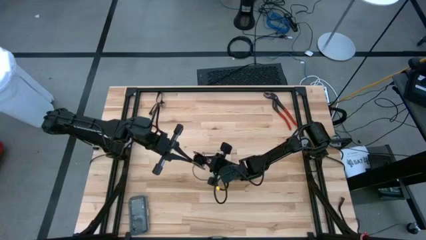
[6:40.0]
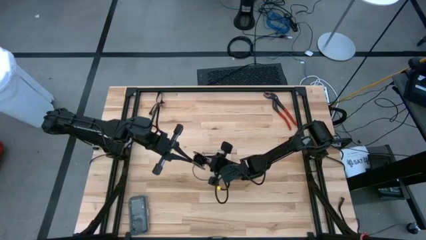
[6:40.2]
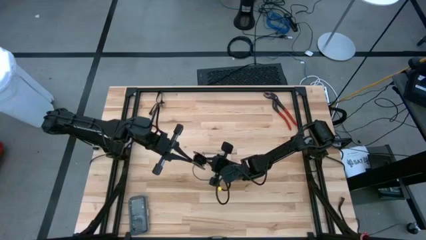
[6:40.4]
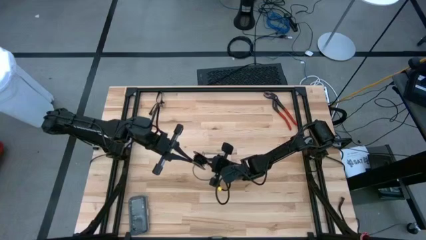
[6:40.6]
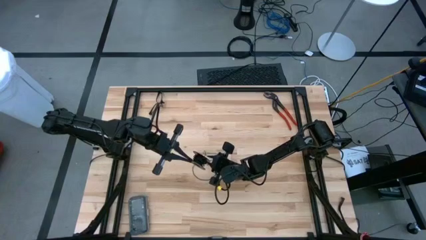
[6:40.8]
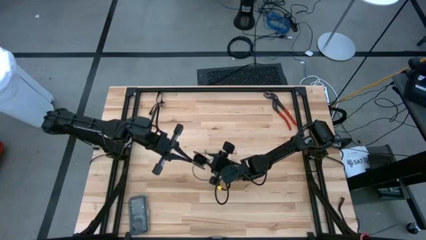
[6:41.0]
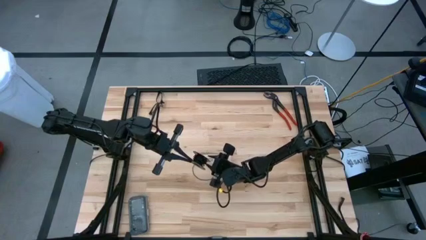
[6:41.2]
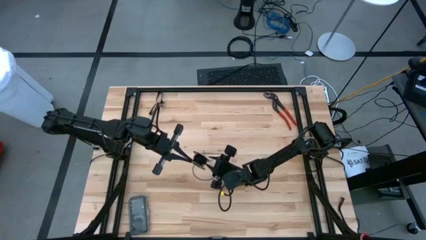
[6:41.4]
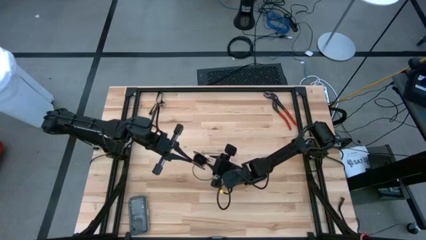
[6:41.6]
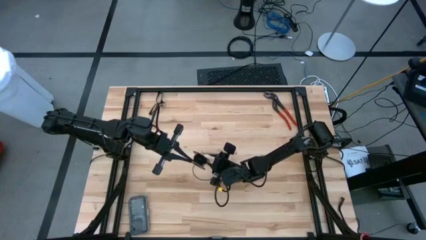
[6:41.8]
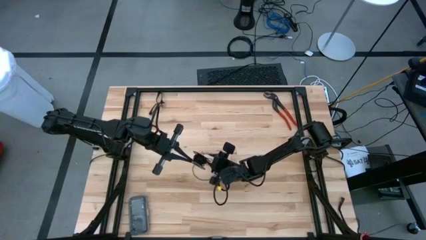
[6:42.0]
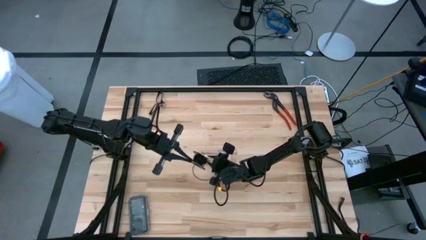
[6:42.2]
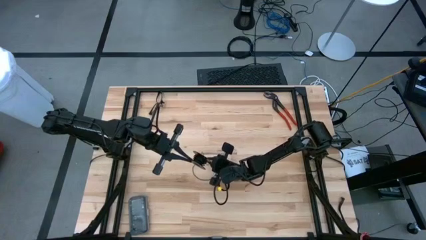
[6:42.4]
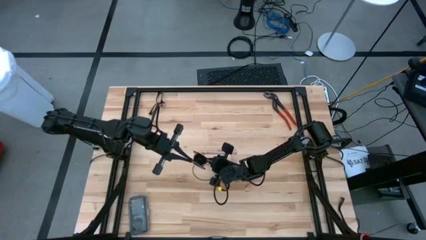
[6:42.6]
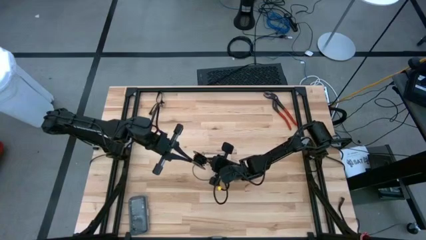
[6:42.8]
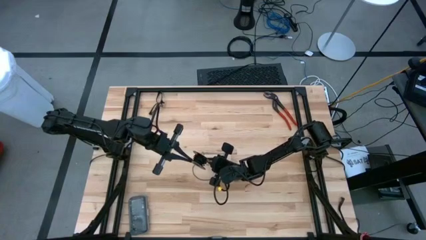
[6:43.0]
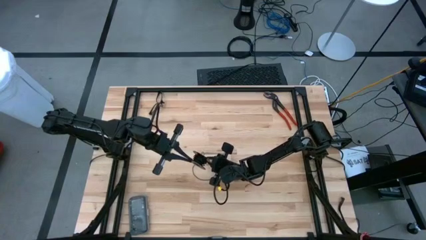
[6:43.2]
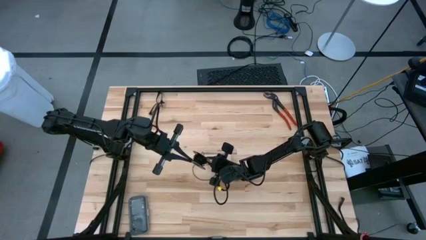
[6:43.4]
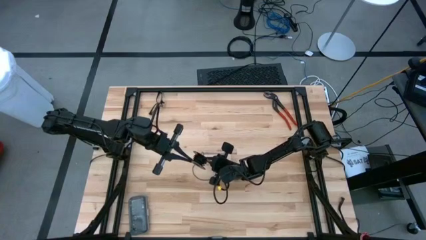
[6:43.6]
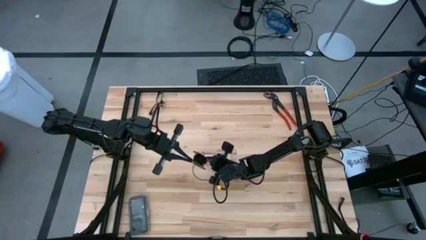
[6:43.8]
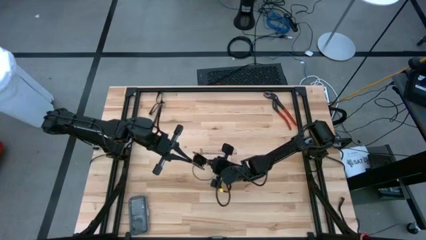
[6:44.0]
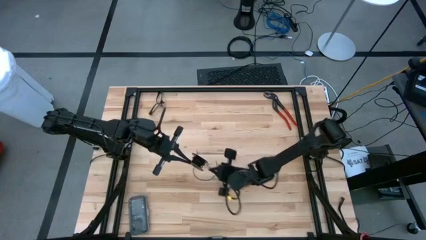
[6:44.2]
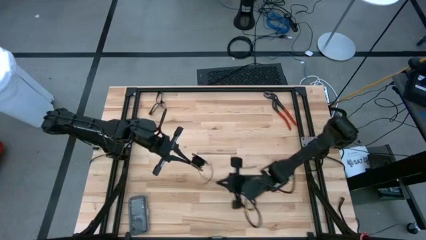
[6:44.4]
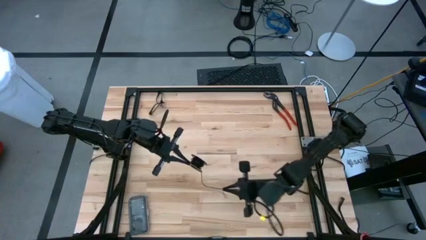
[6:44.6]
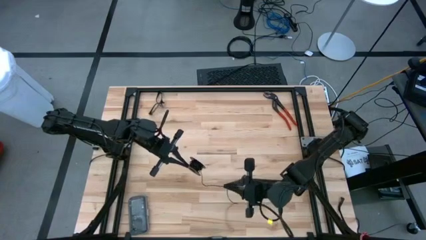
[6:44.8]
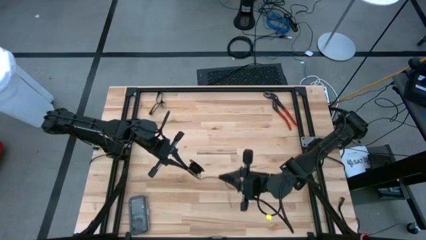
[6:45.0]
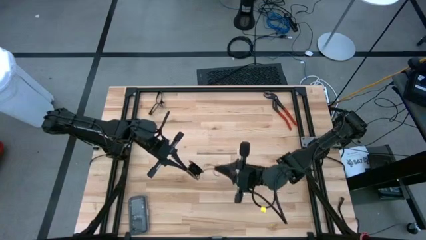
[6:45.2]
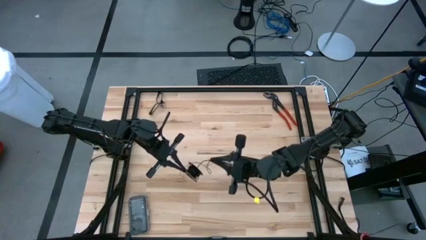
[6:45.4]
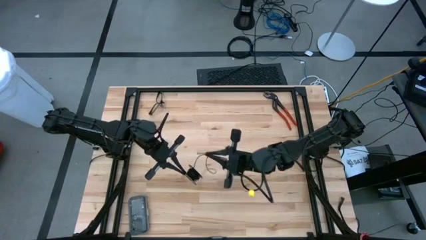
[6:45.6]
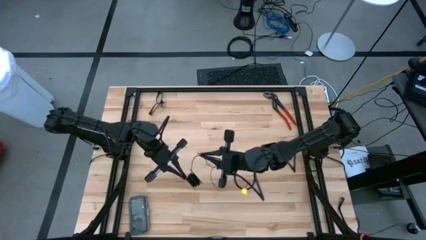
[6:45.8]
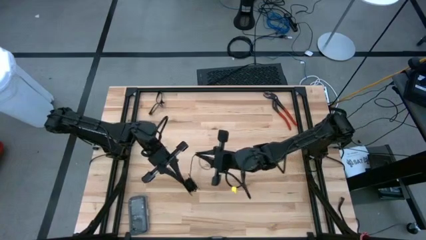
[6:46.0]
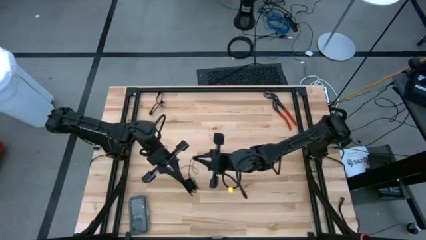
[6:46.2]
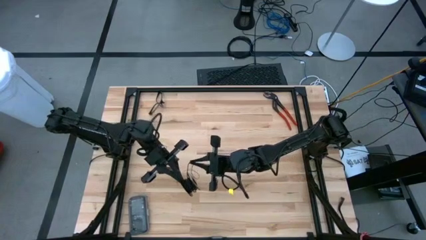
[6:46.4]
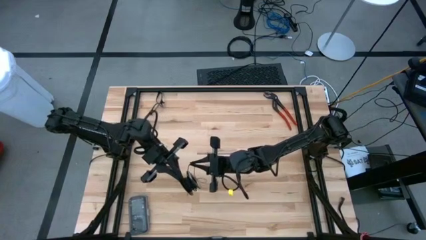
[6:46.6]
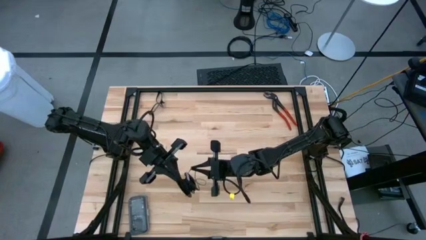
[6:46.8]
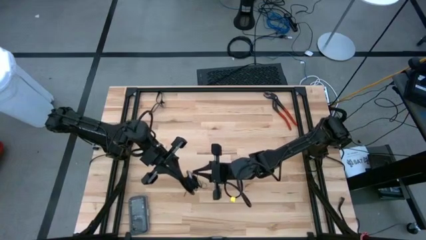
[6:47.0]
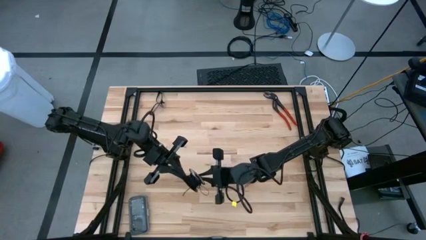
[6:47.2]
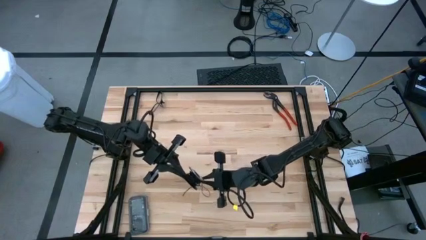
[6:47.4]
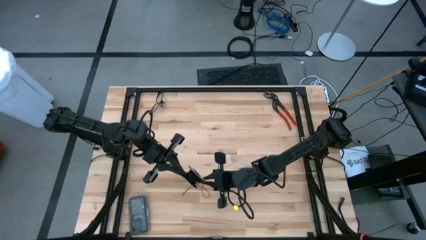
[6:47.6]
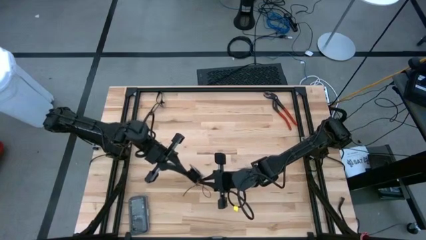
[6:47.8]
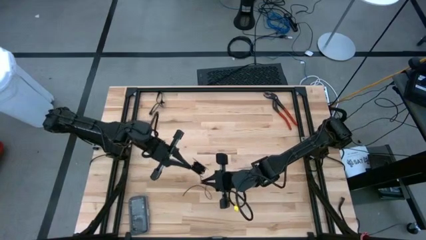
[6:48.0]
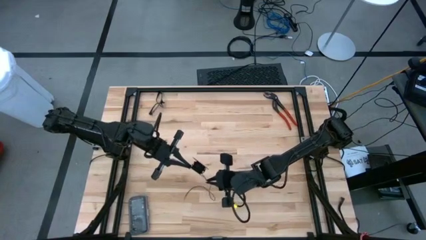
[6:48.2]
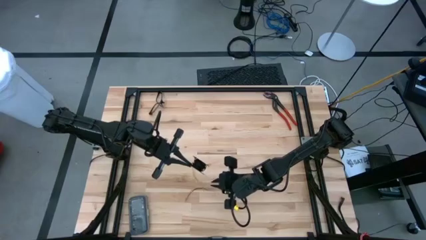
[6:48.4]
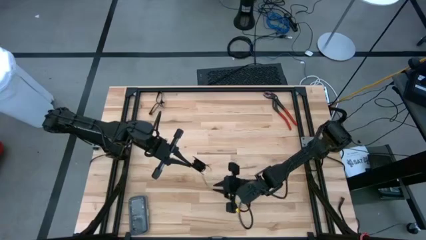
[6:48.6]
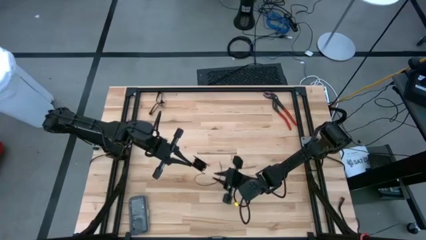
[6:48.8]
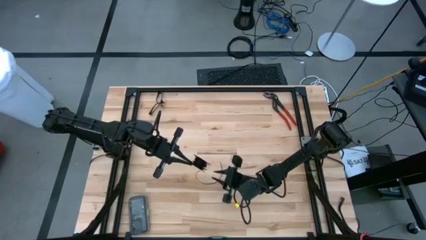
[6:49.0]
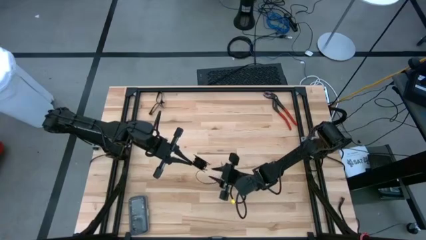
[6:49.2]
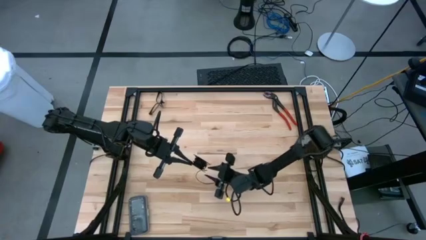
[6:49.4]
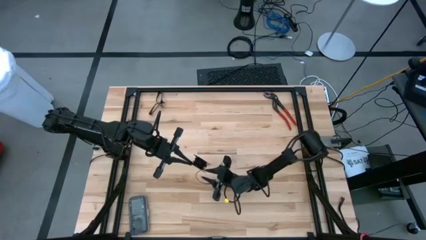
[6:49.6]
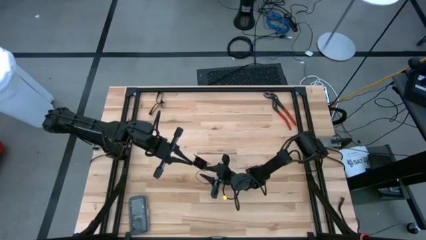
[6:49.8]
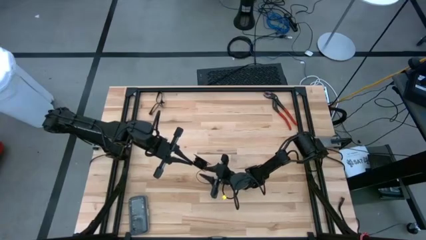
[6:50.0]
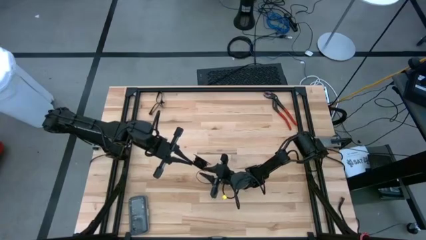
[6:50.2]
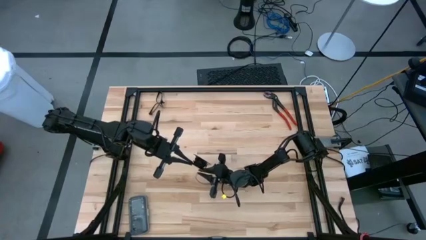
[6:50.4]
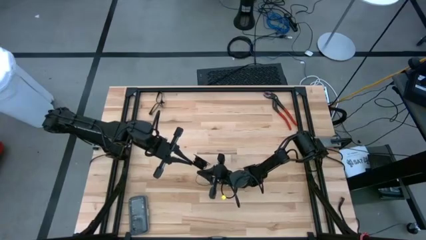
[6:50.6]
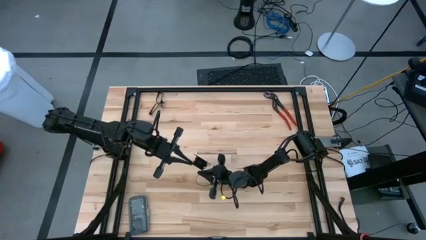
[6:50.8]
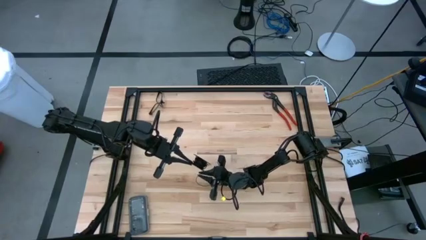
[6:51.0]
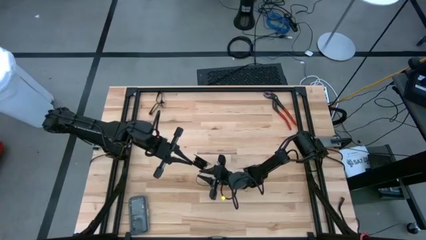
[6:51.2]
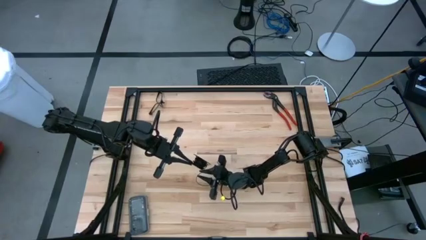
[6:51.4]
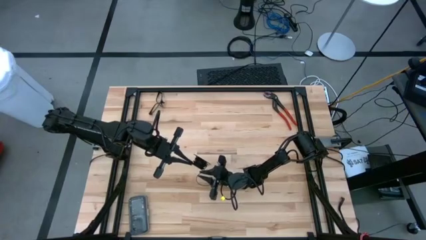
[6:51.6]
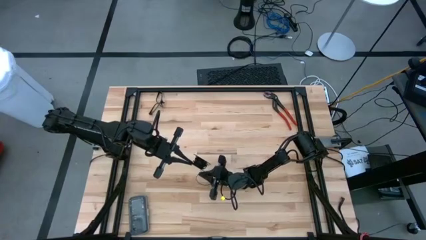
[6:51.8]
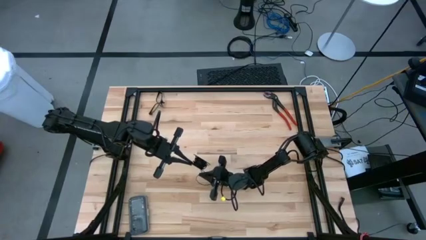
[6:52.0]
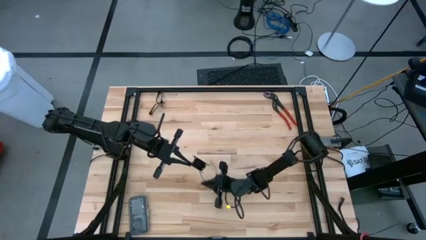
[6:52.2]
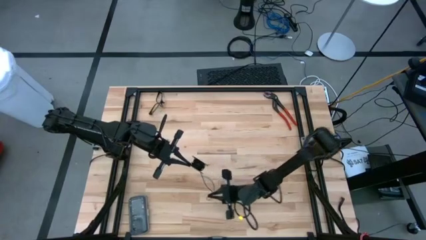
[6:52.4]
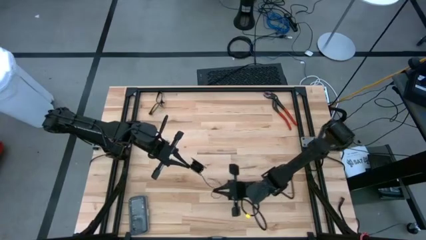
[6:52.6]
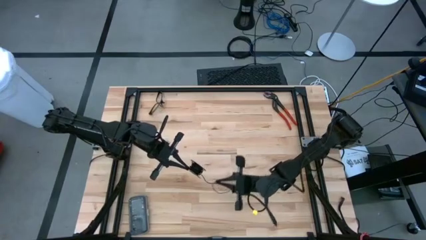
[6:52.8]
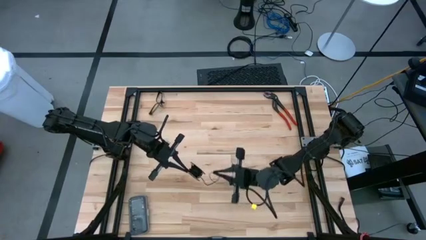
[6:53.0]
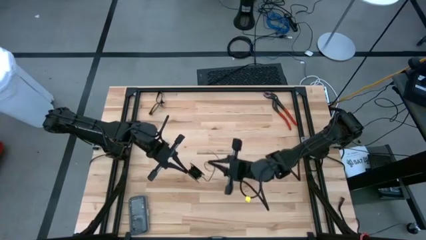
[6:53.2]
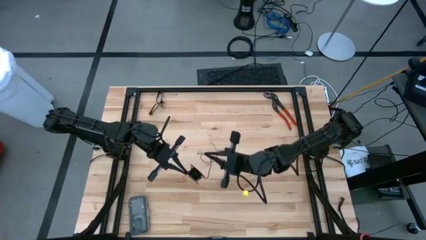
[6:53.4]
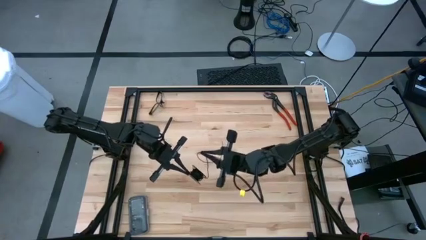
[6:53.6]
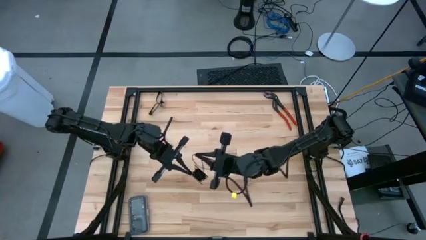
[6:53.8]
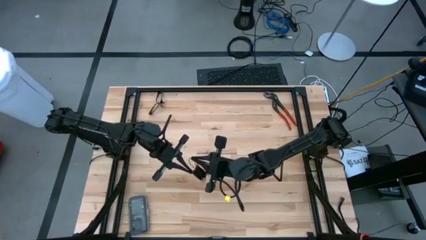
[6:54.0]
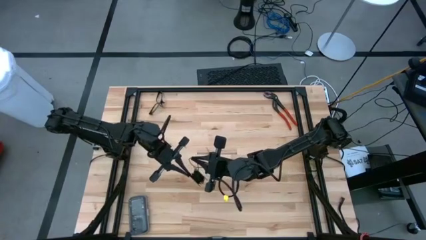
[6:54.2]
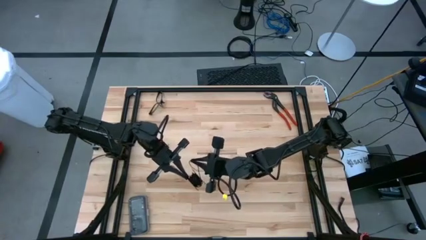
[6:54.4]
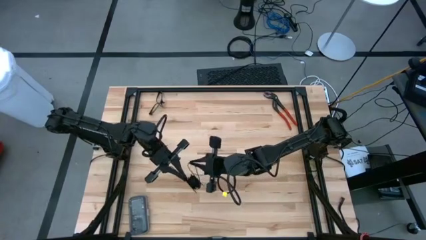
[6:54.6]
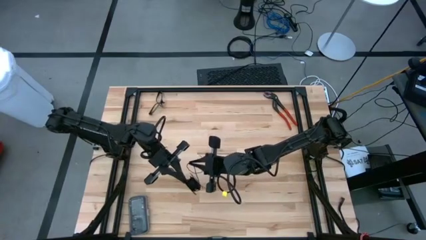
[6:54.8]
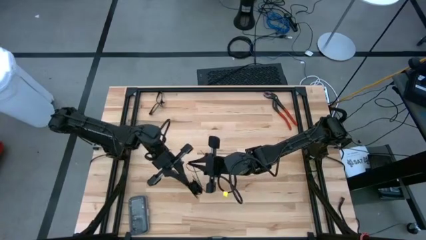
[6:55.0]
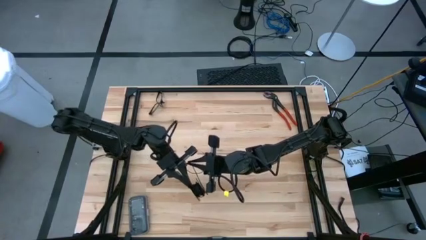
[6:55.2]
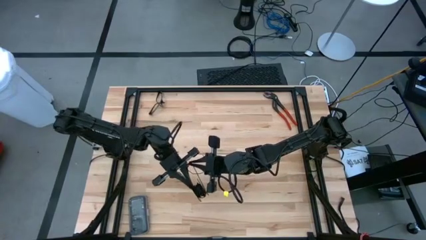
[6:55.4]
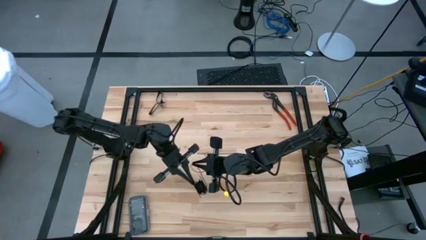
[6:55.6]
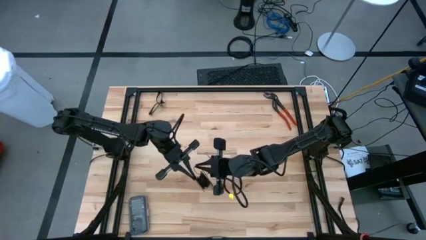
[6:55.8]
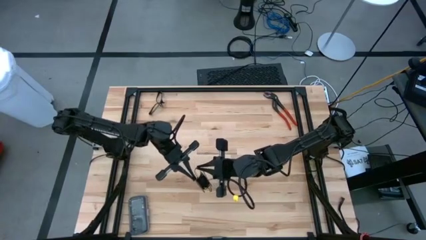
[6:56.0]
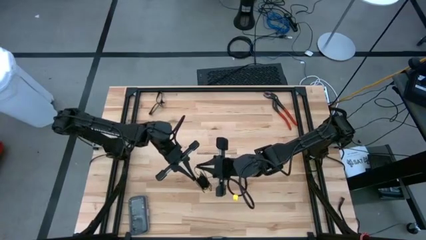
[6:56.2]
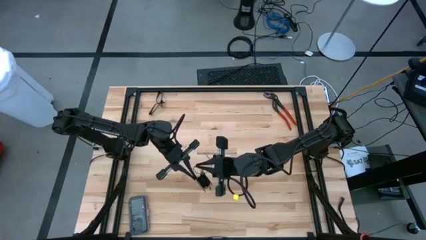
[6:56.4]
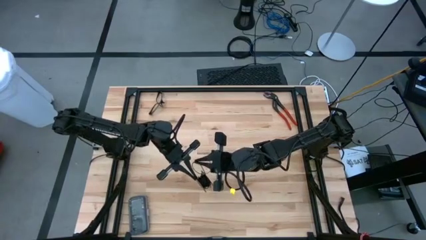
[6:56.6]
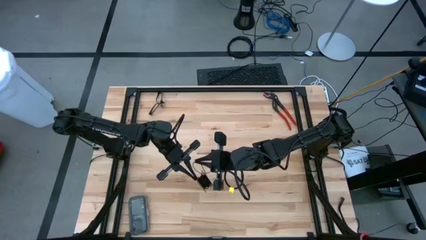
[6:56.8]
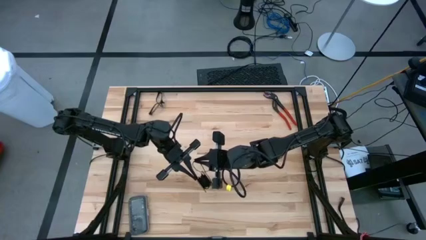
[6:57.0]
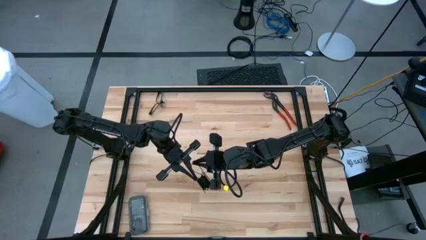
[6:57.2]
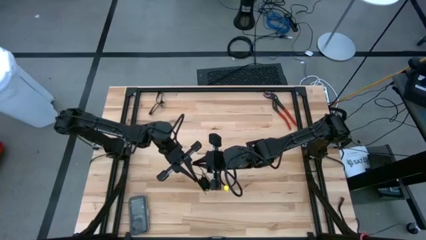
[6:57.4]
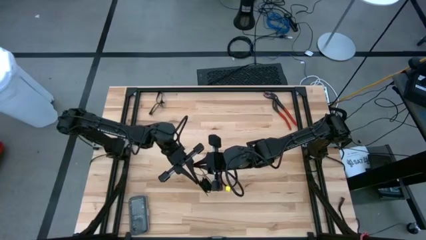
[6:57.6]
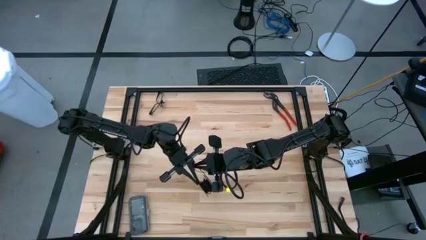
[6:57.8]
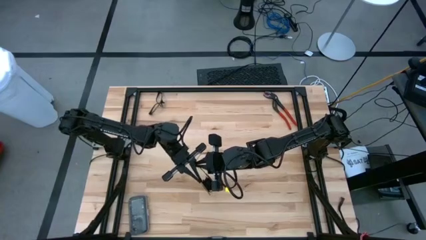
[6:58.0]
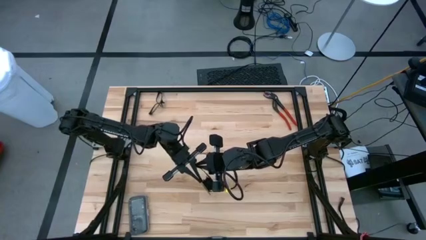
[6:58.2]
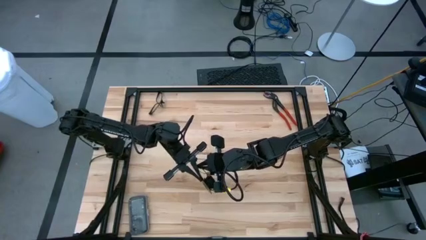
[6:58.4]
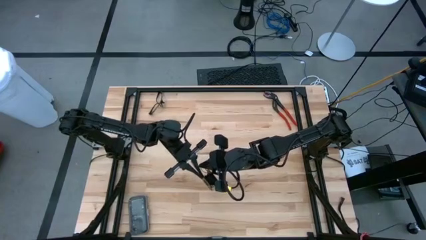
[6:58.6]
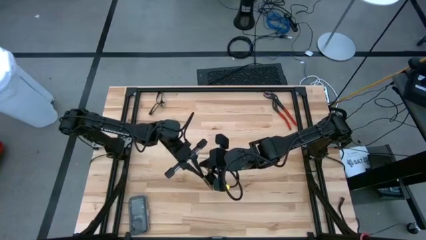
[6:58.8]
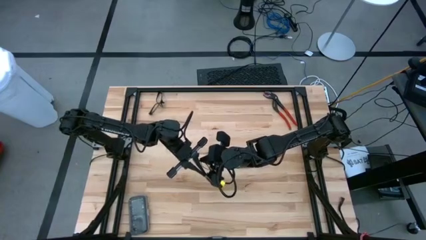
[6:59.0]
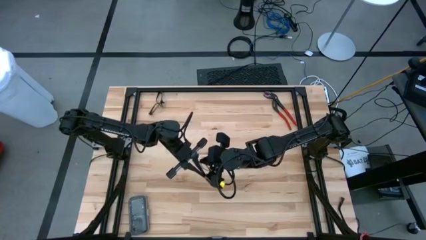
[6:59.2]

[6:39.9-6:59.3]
Task: Coil cords
Coil the black wire onto the spool
